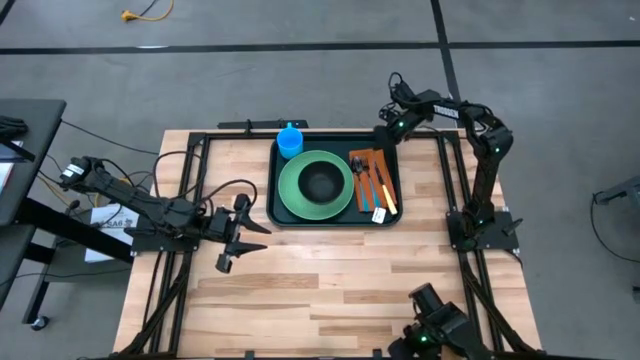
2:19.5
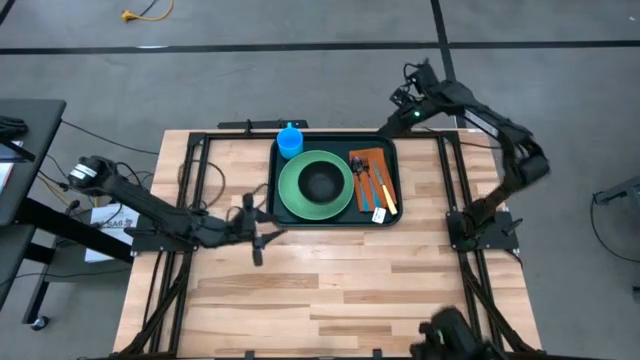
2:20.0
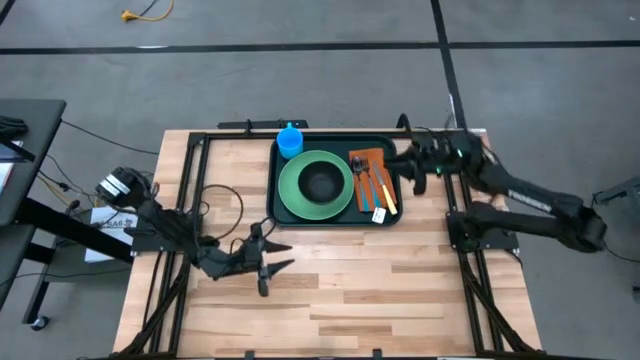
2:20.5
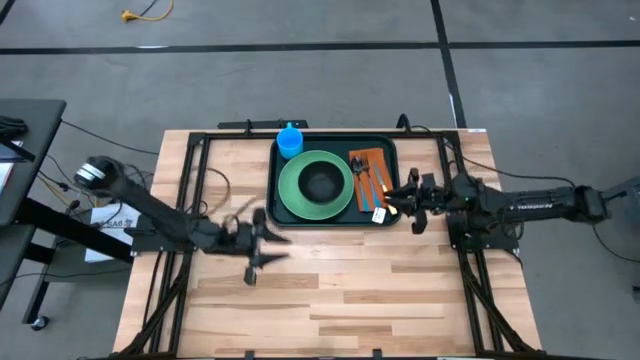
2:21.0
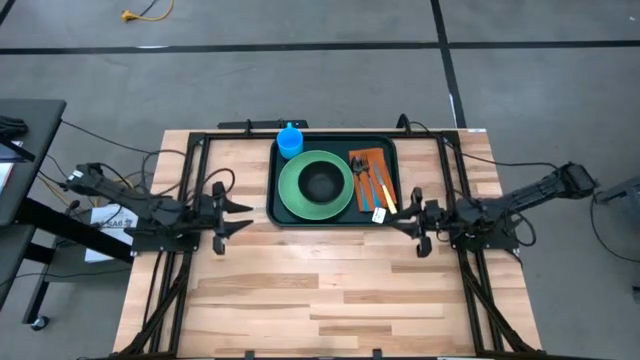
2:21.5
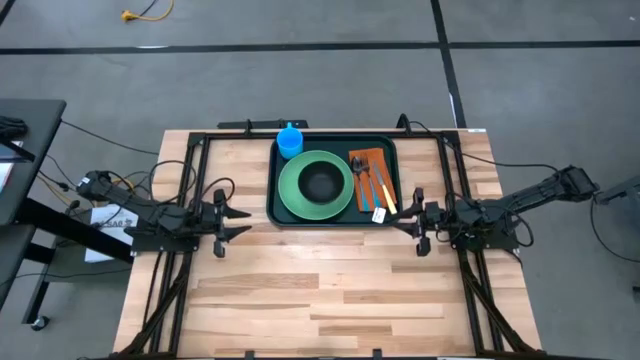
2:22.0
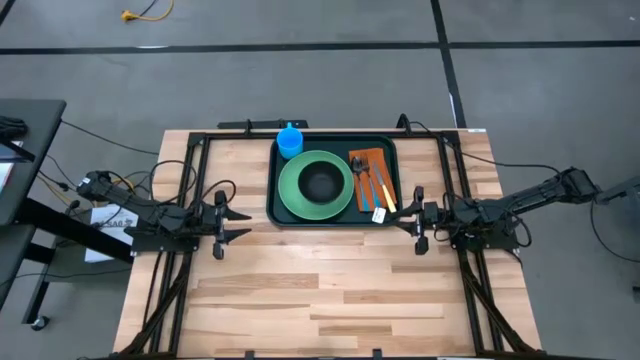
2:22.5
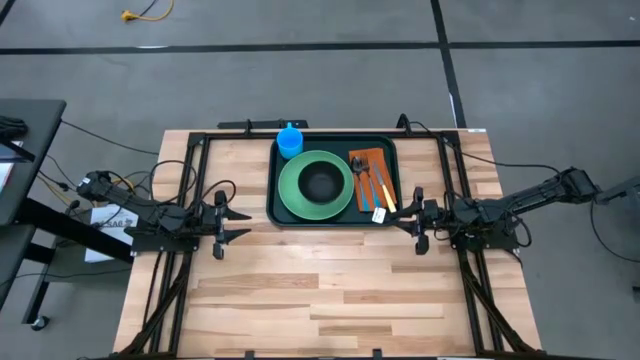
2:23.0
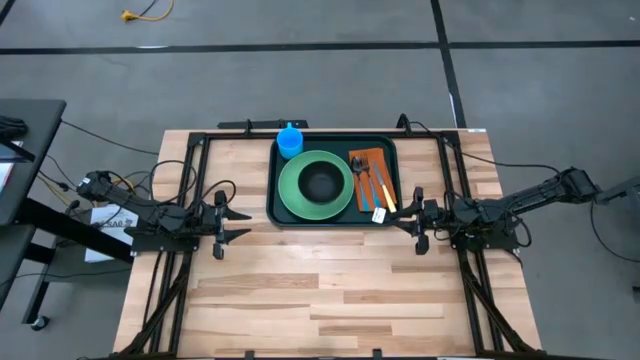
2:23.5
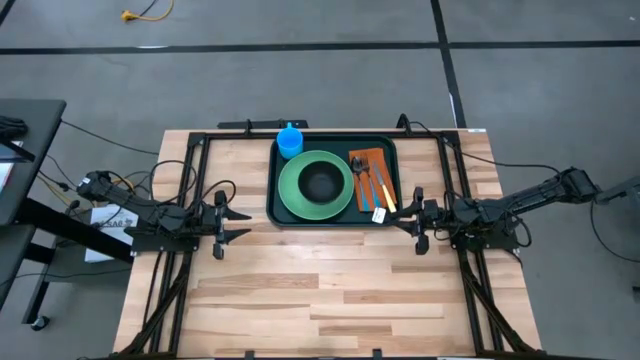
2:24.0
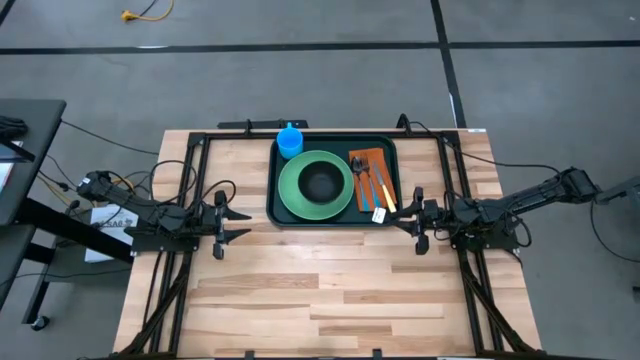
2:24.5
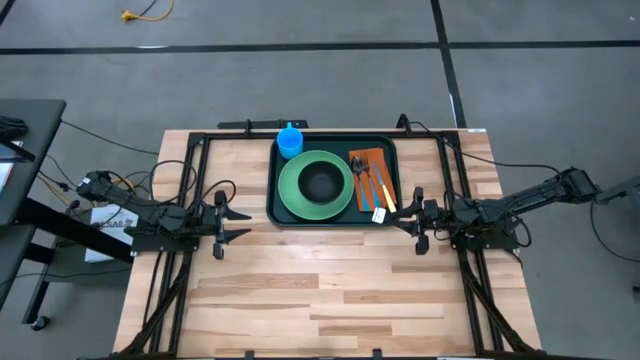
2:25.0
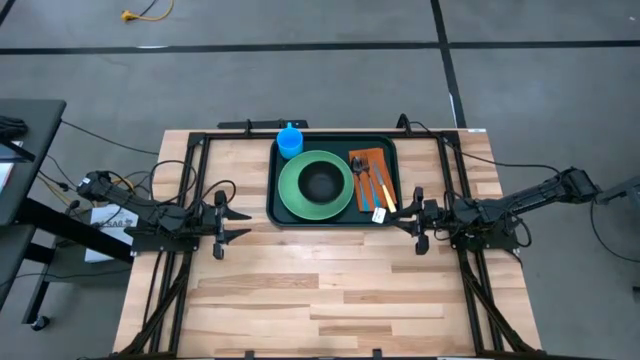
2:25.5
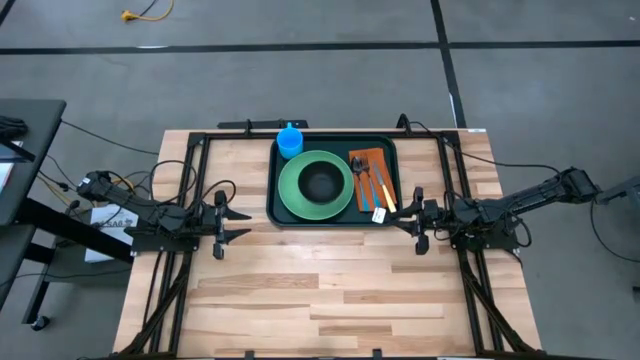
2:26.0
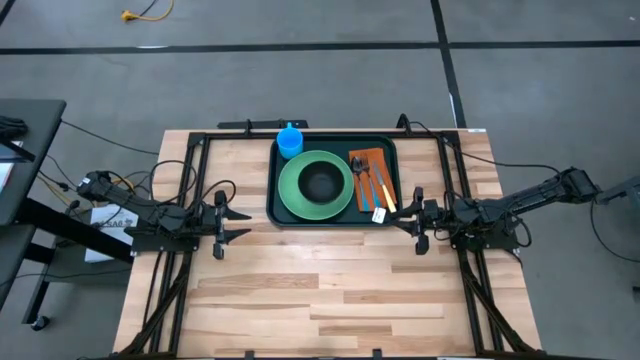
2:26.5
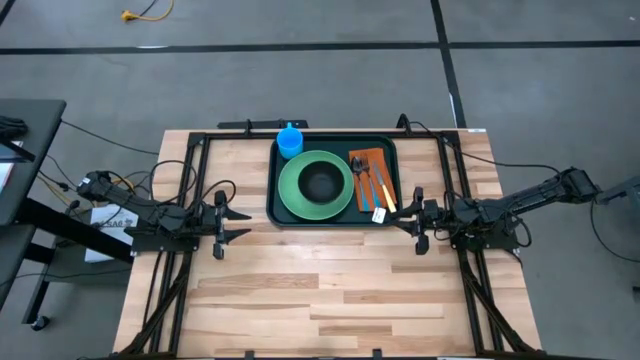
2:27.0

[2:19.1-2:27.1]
Task: Set up tray
Return to Home Position

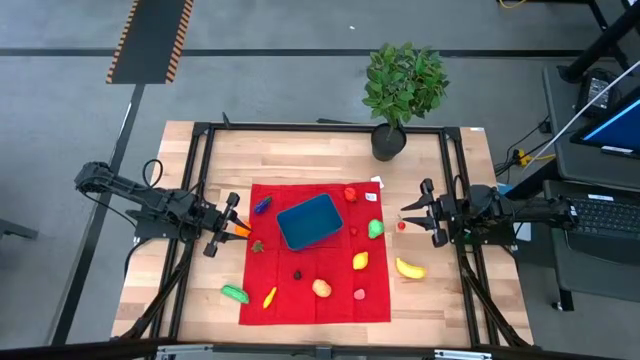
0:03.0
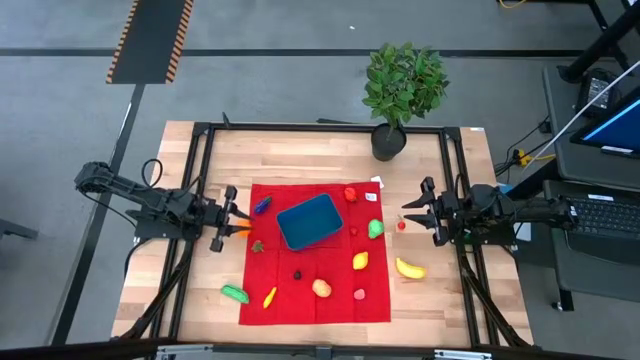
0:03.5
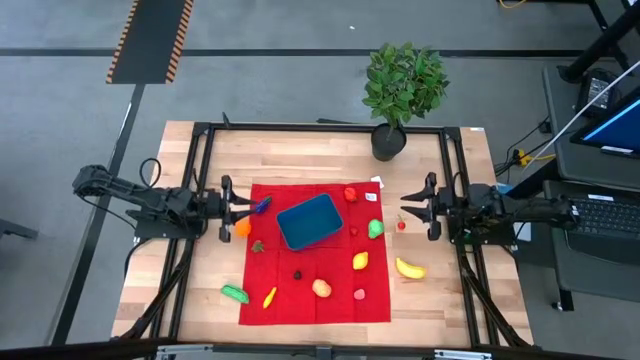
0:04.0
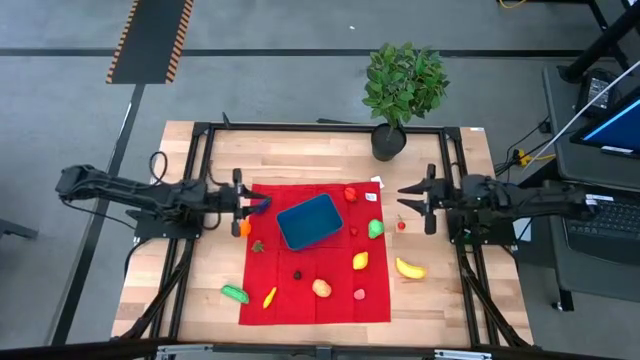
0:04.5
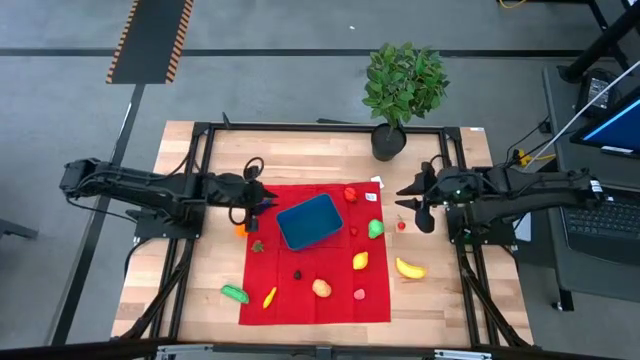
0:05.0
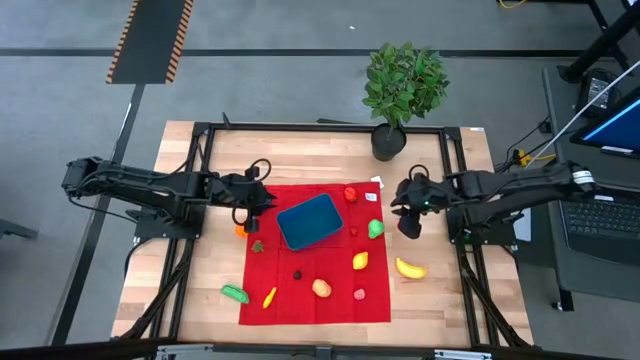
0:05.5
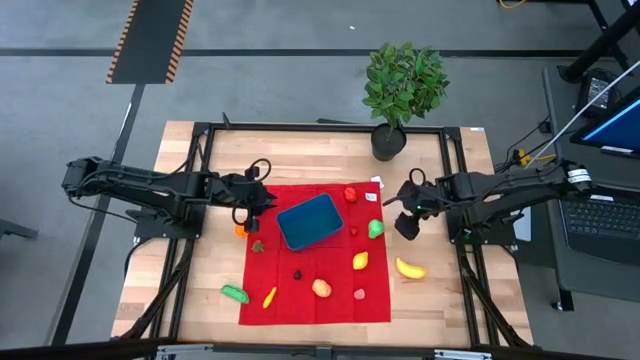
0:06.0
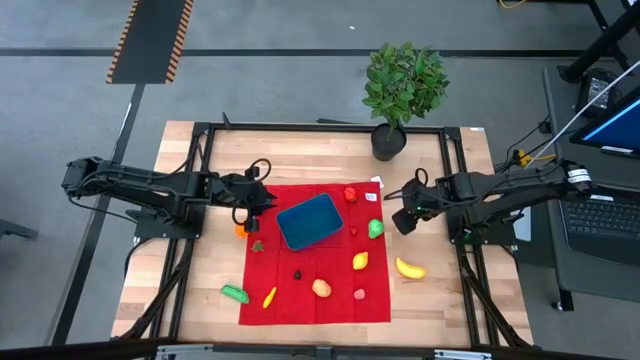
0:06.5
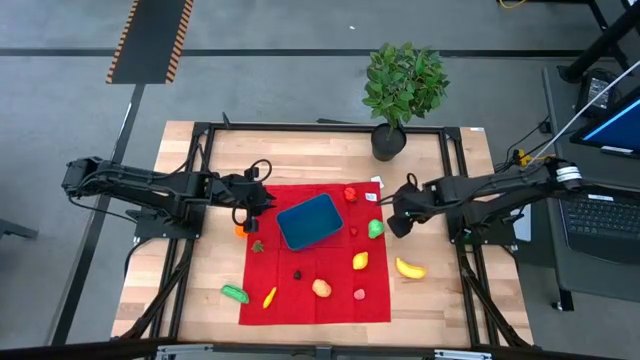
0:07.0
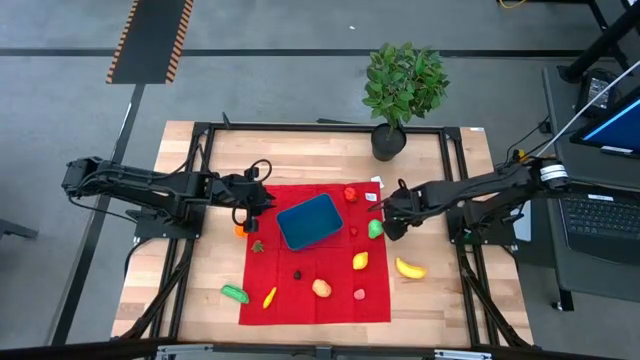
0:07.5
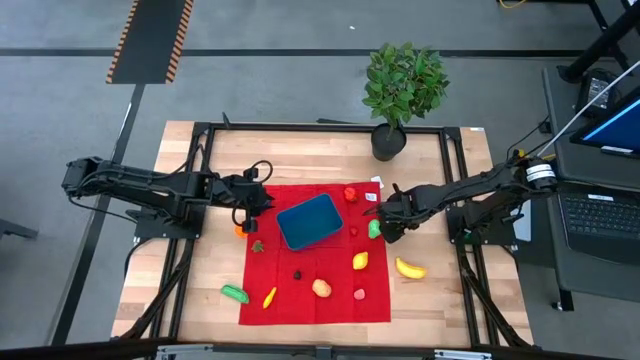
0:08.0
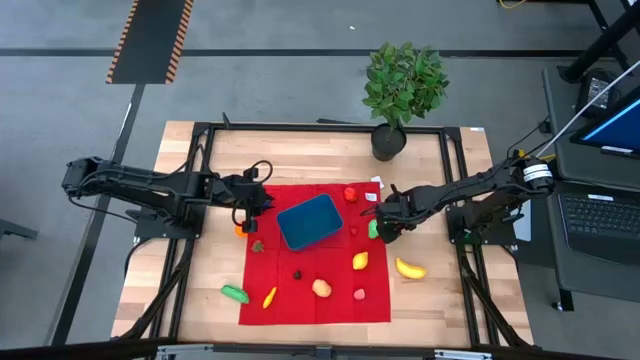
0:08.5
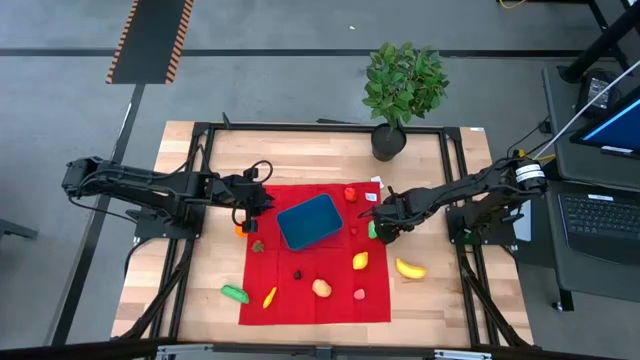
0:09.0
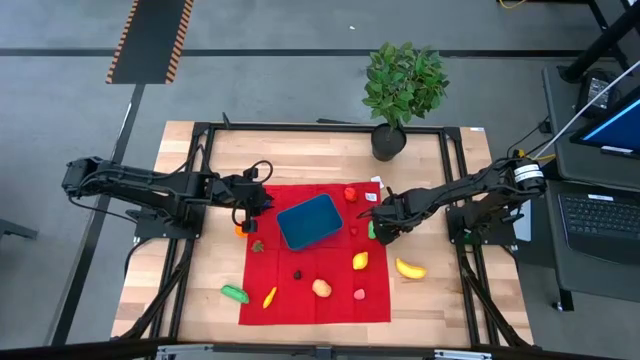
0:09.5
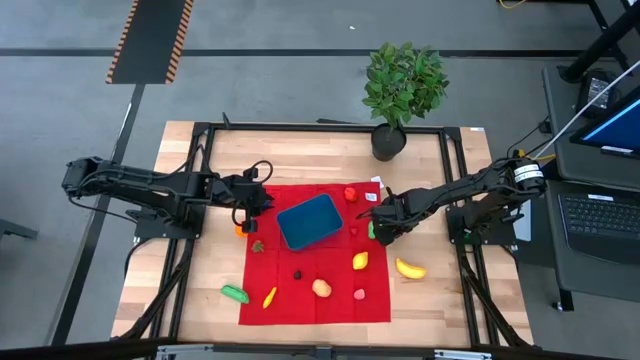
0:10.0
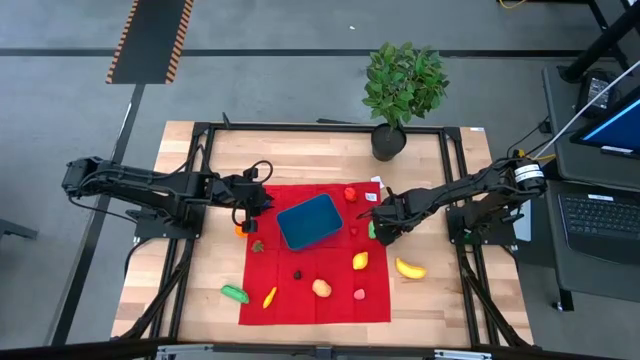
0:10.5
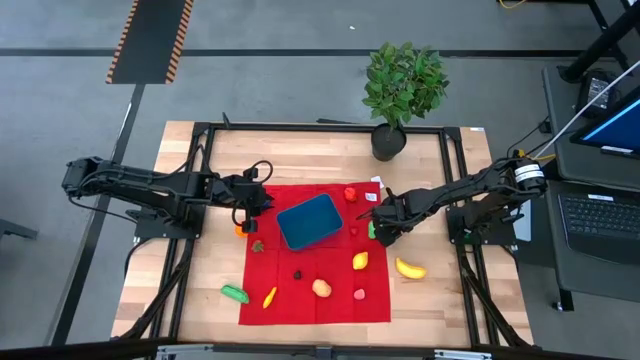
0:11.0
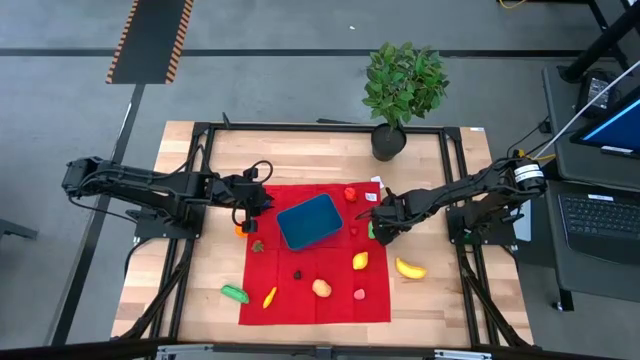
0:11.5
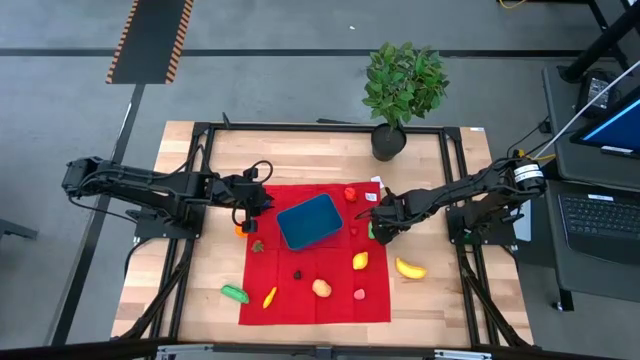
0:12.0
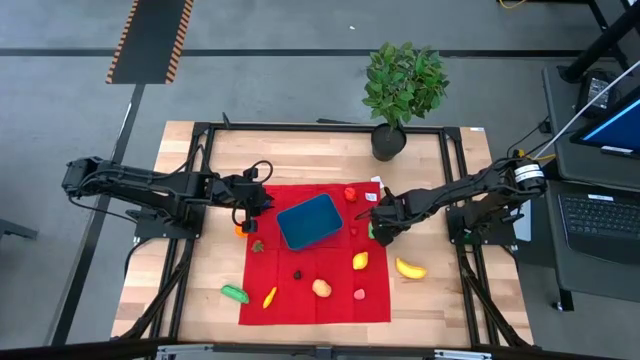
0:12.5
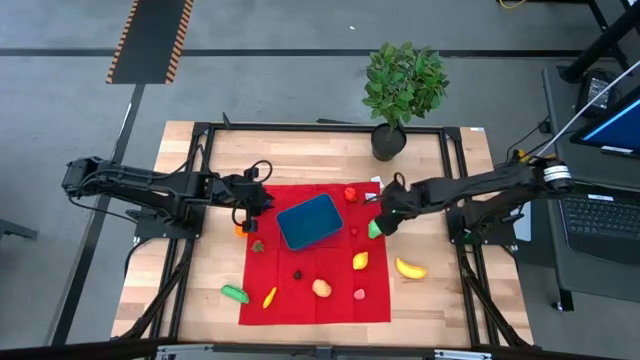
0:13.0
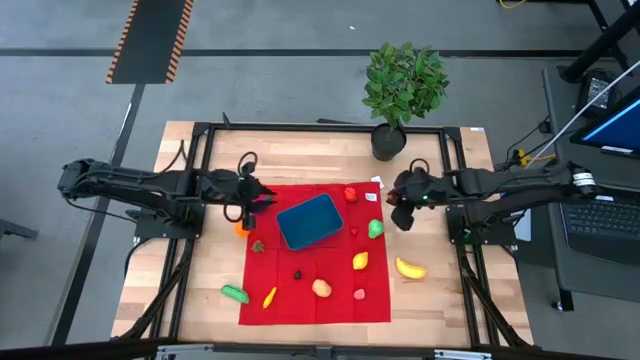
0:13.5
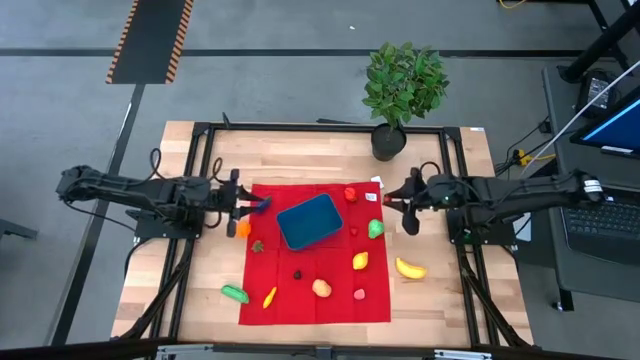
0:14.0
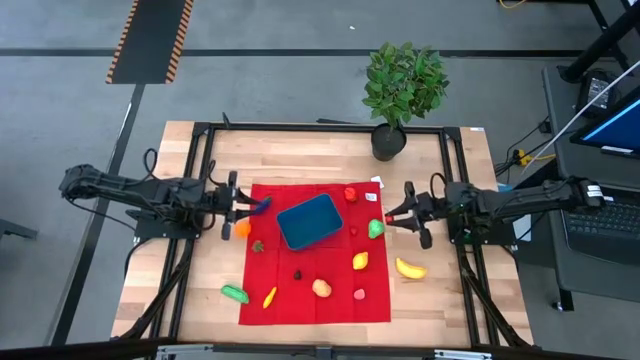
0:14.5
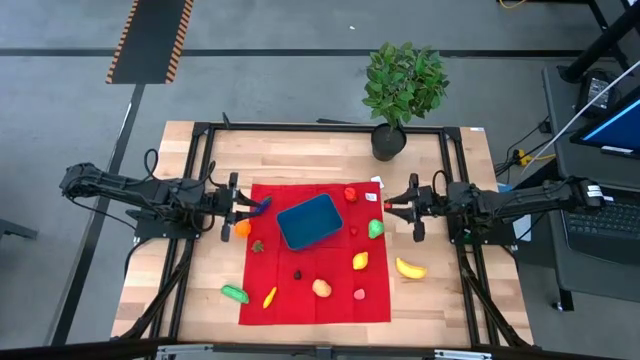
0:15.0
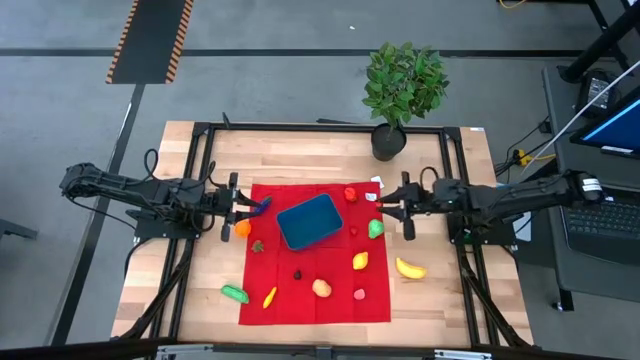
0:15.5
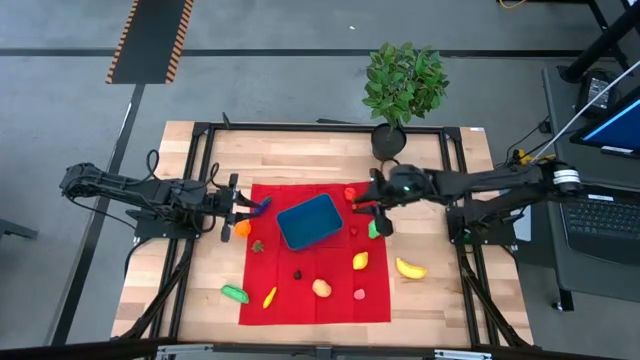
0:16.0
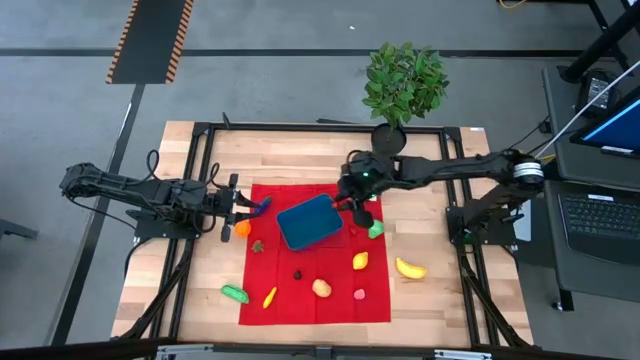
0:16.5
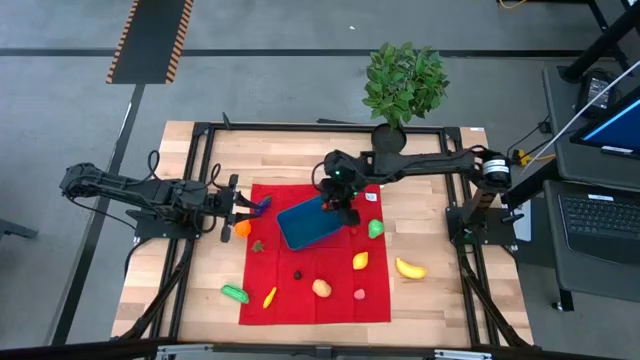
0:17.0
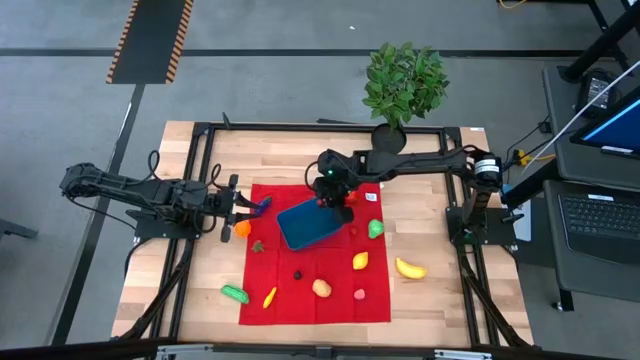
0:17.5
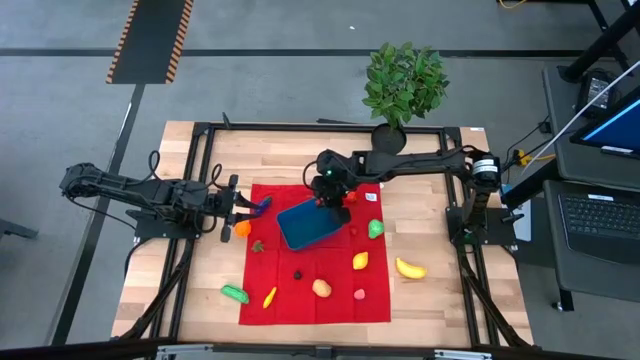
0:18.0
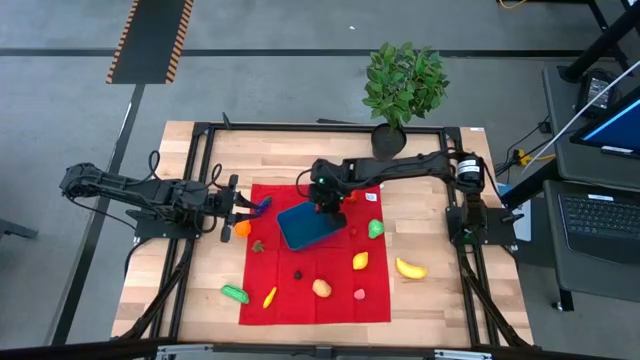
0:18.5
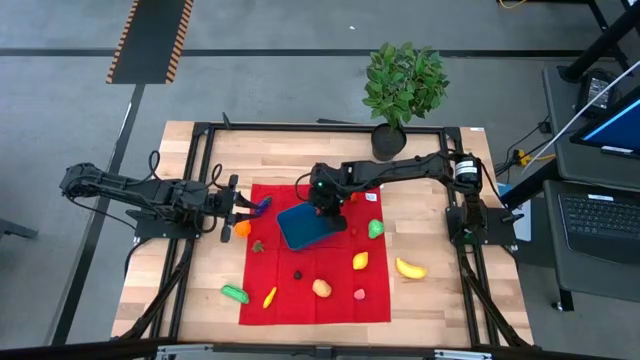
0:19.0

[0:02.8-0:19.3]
Task: Pick and placing Produce into tupperware
Put the cherry into the blue bin
